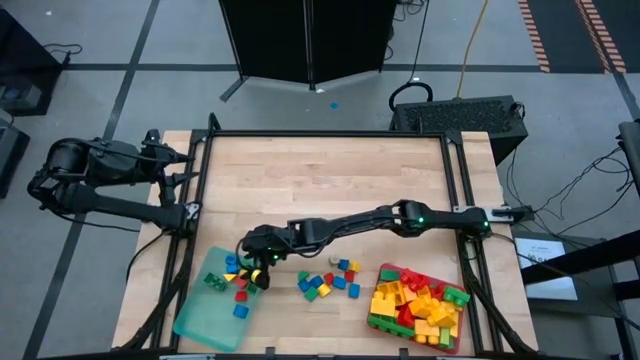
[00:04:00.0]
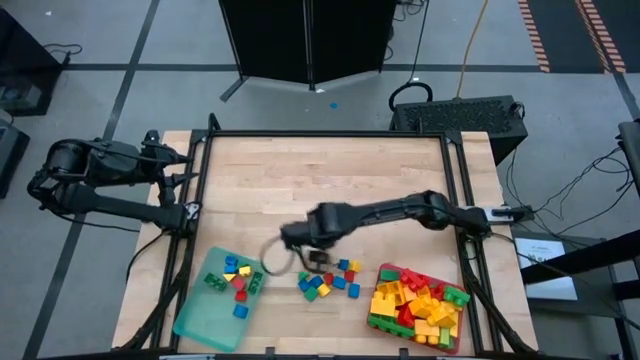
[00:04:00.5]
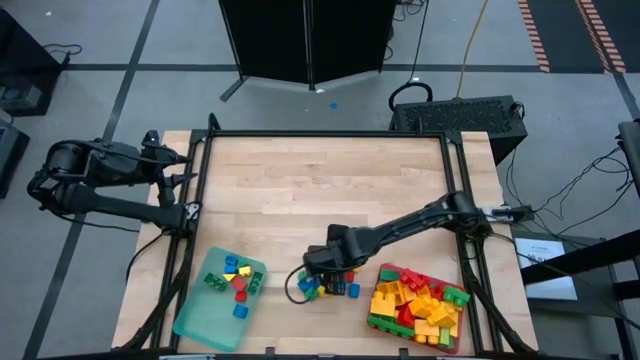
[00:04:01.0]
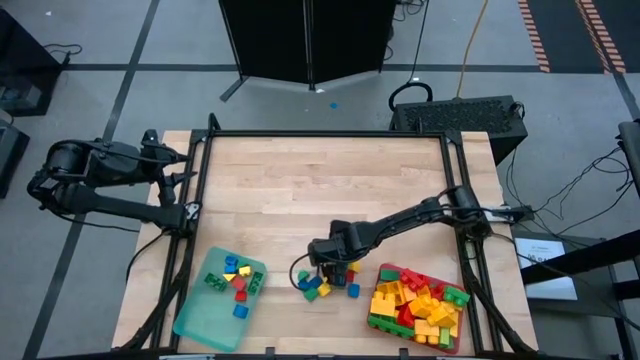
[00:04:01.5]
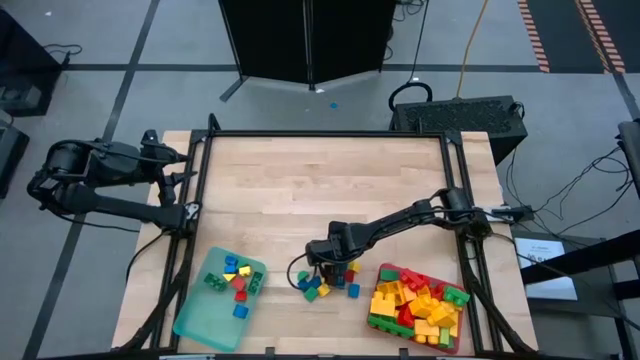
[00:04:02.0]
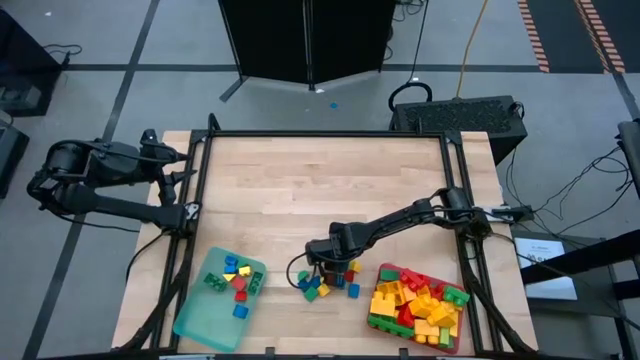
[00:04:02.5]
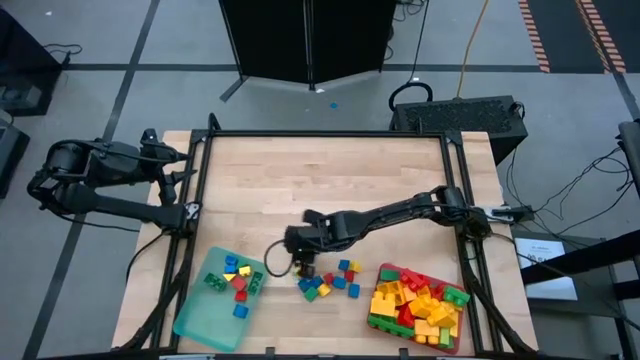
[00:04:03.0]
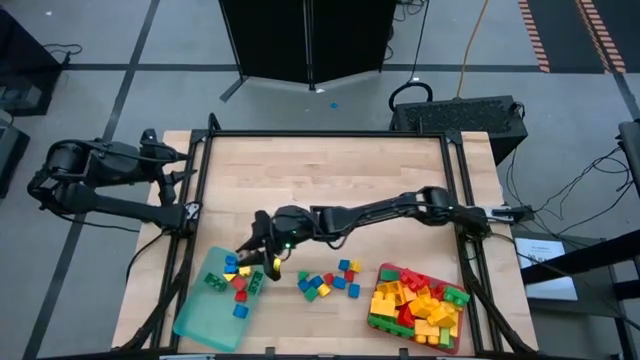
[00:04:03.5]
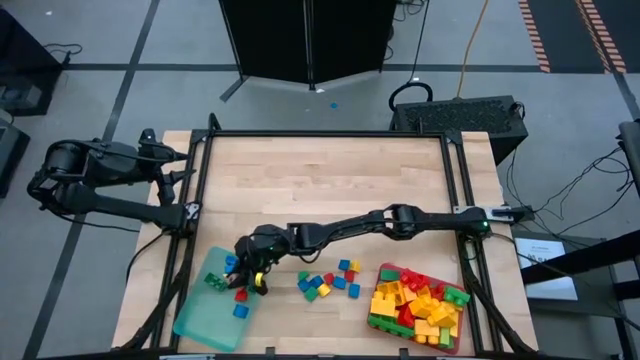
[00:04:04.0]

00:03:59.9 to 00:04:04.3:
Task: Sort blocks by size
Put the wooden block into the blue bin

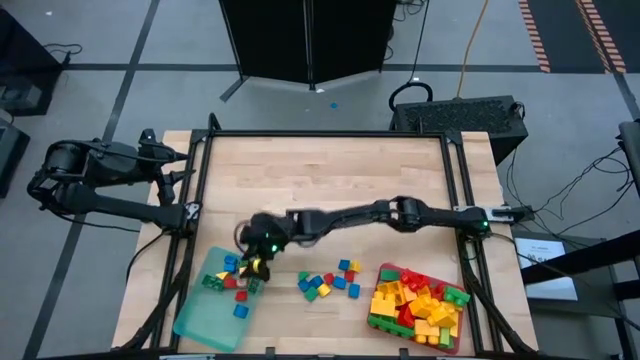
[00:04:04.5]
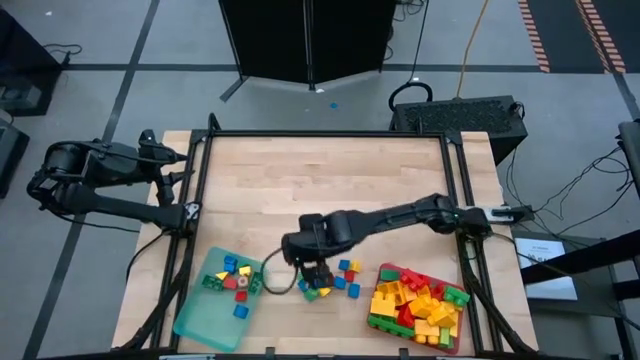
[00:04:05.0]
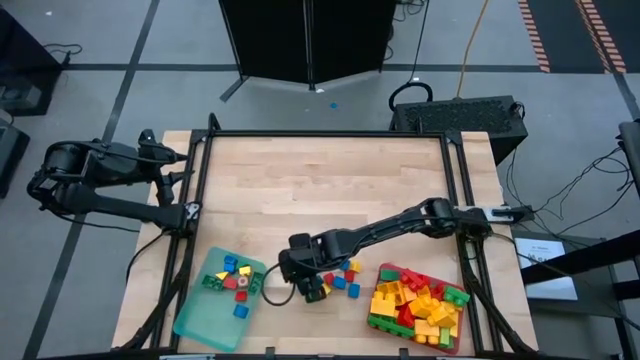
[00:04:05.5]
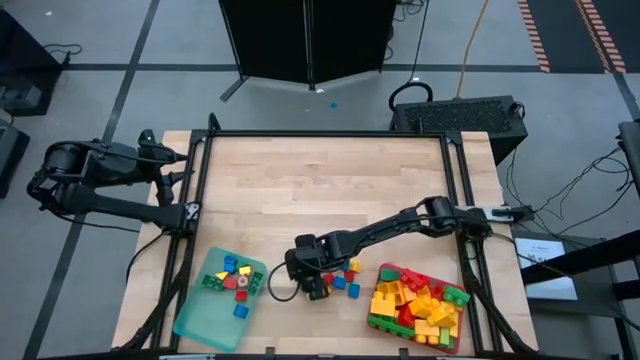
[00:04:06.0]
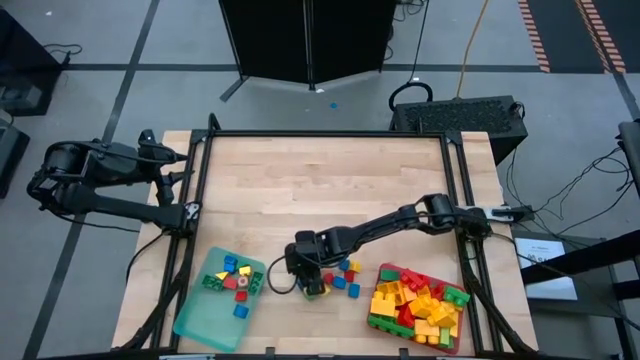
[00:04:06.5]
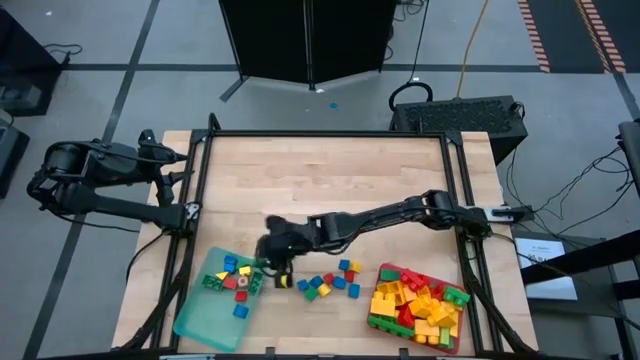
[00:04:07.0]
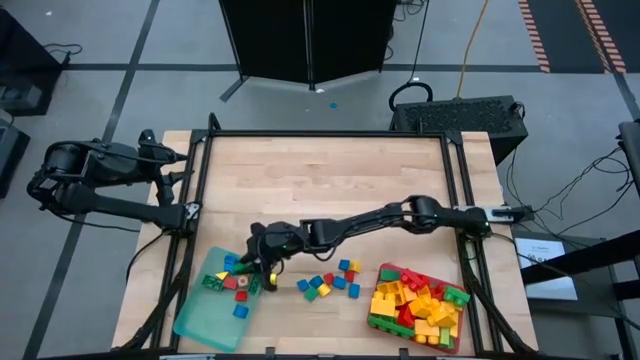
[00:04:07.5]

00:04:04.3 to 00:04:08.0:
Put the green block into the blue bin

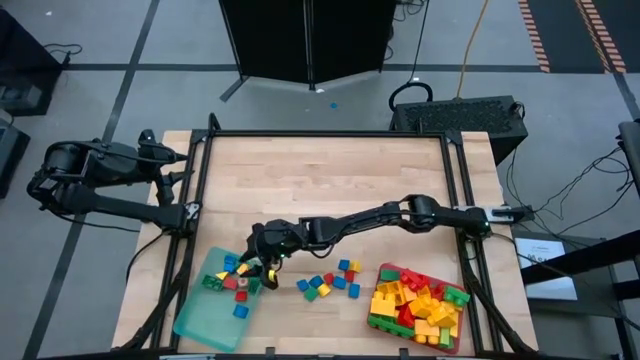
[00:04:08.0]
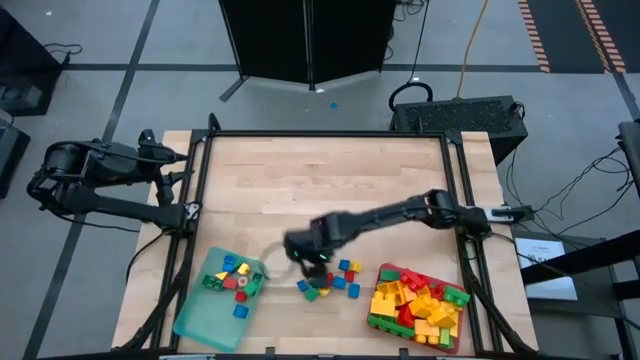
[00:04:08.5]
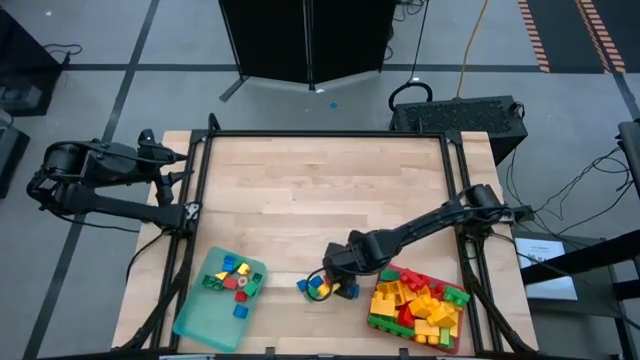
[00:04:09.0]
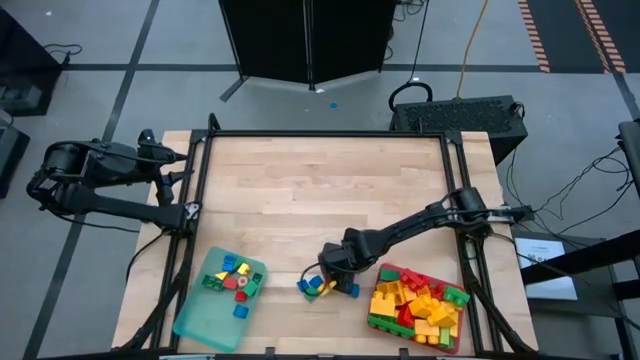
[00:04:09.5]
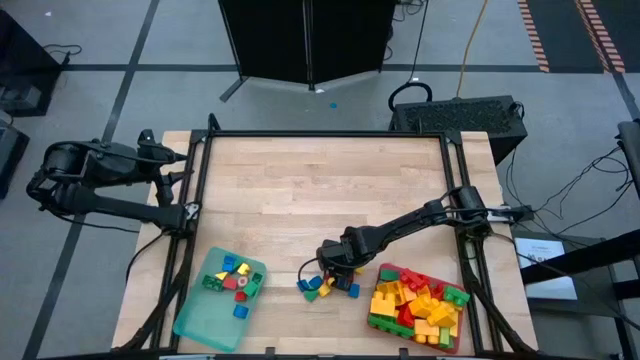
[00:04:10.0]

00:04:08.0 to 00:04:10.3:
Put the blue block into the blue bin

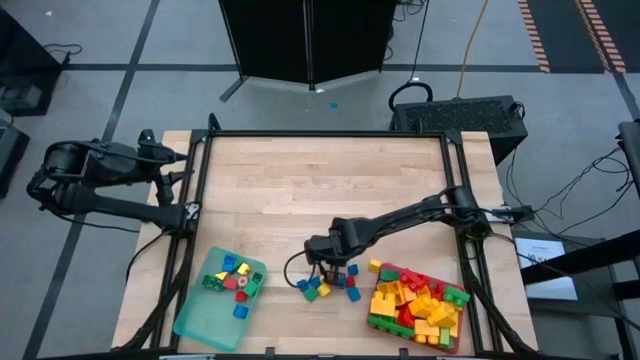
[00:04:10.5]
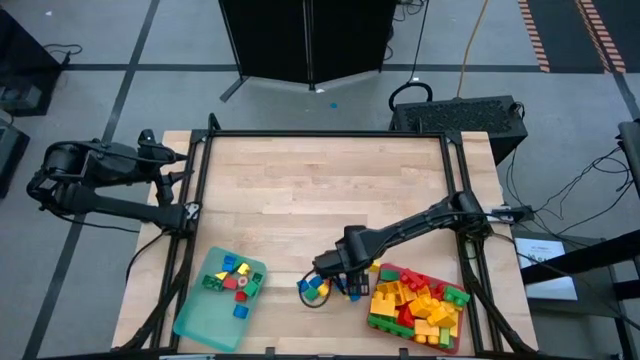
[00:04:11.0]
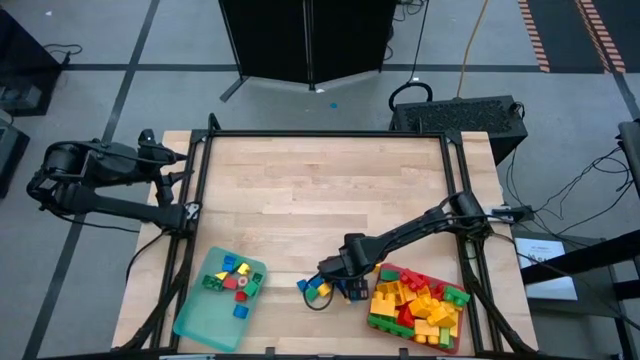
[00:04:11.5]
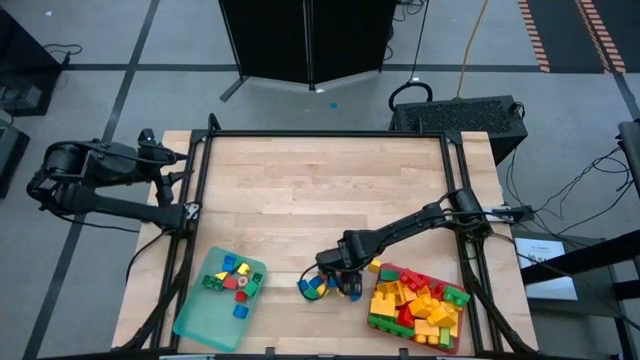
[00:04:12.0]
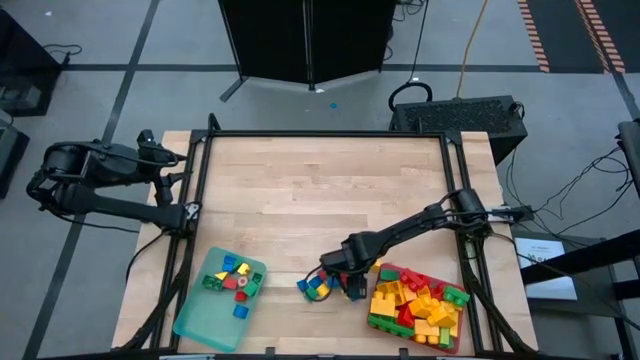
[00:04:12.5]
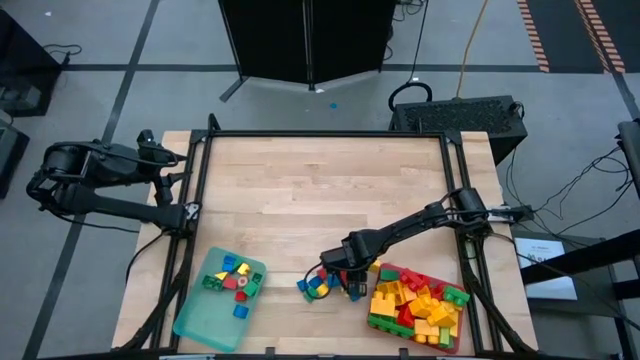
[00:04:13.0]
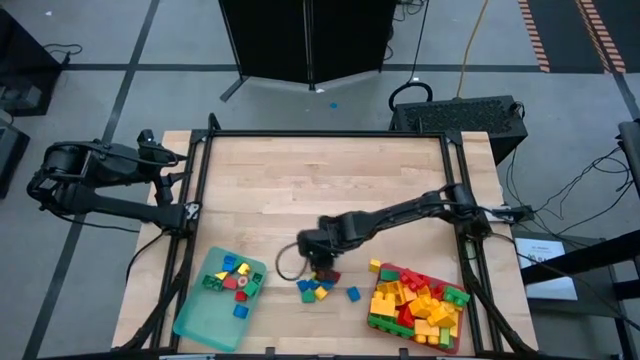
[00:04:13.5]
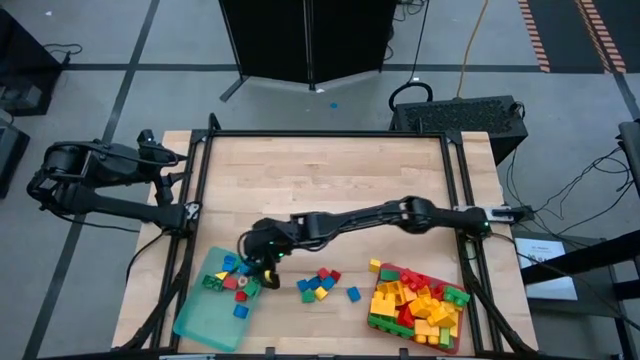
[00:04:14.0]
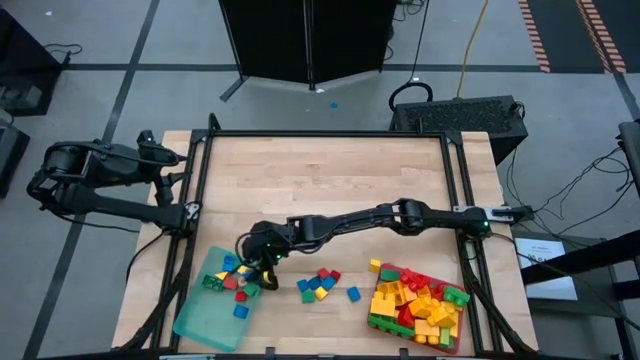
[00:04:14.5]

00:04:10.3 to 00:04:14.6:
Put the blue block into the blue bin

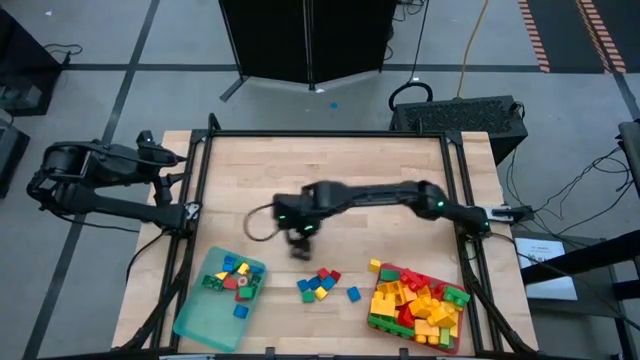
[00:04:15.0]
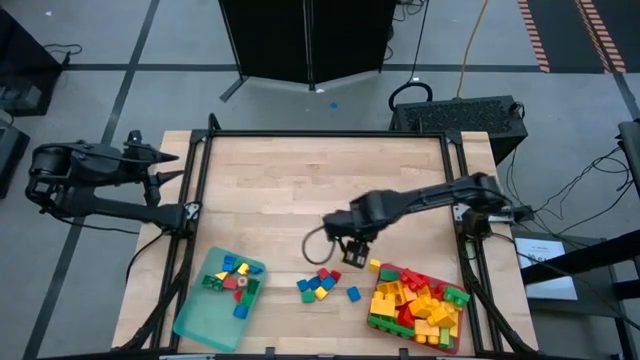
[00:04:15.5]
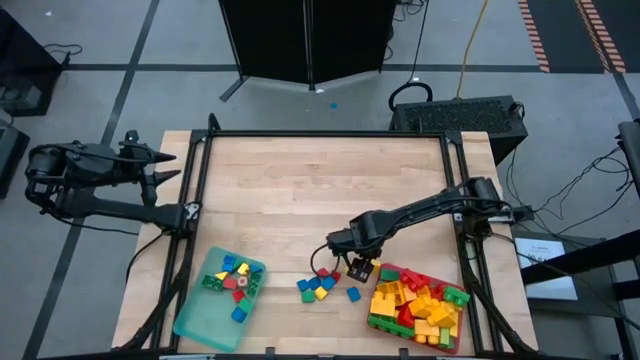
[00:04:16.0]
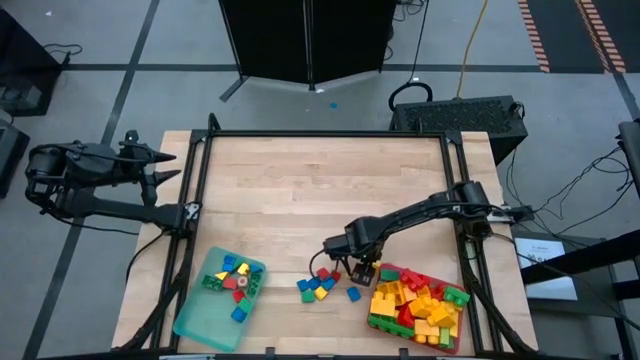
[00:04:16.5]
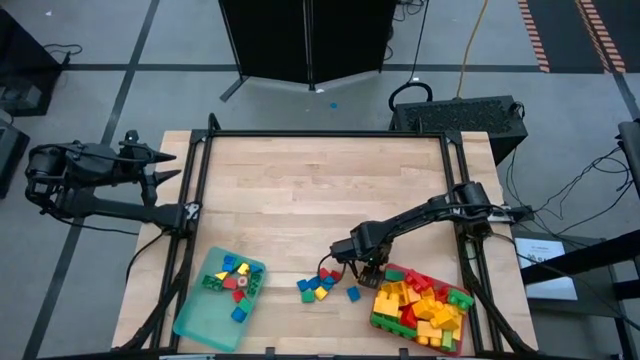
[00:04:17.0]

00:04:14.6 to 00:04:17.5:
Put the yellow block into the blue bin

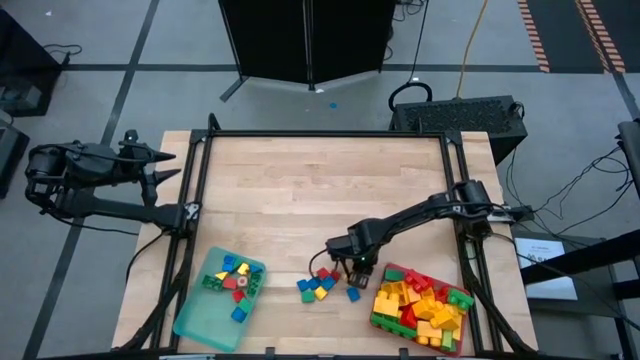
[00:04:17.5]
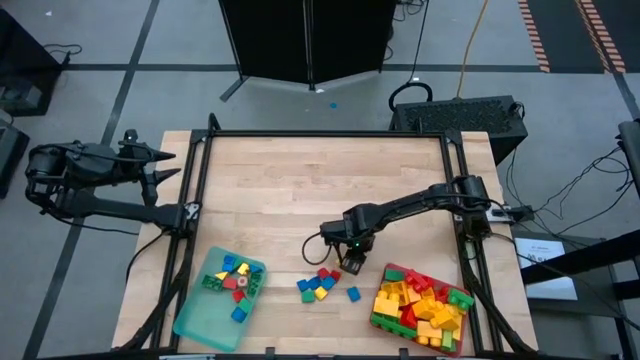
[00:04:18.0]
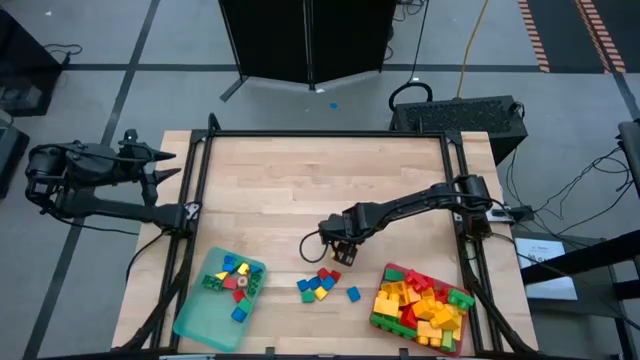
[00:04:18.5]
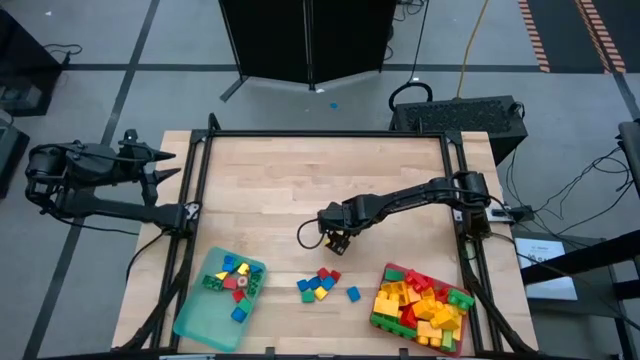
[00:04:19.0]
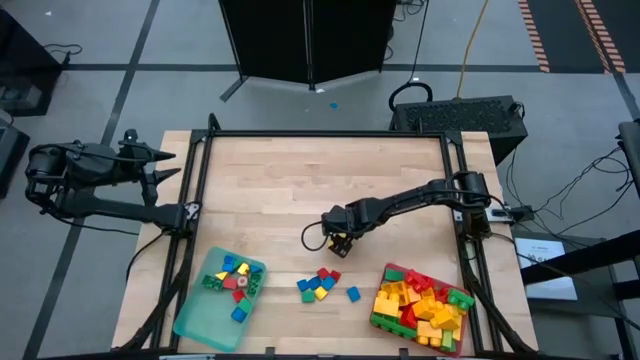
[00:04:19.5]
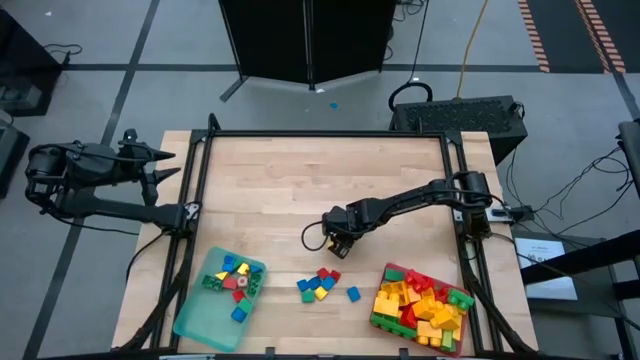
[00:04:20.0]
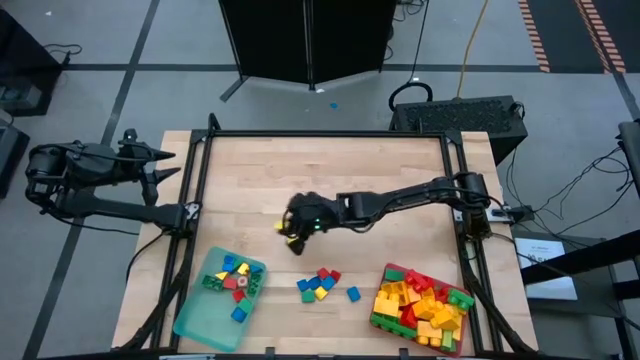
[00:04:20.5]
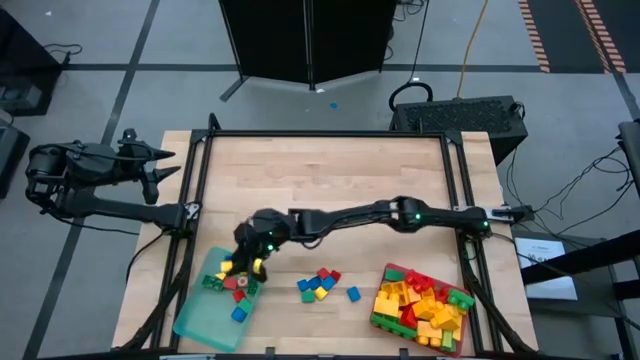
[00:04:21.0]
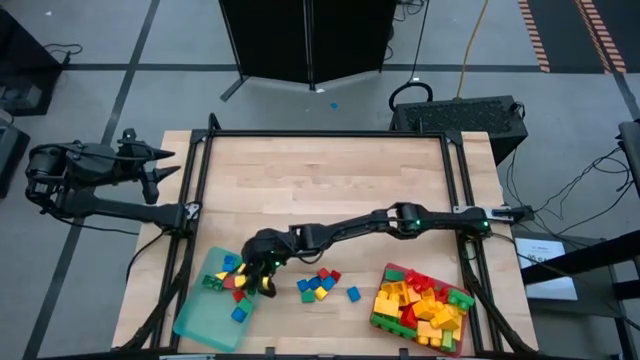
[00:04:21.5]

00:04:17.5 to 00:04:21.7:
Put the yellow block into the blue bin
